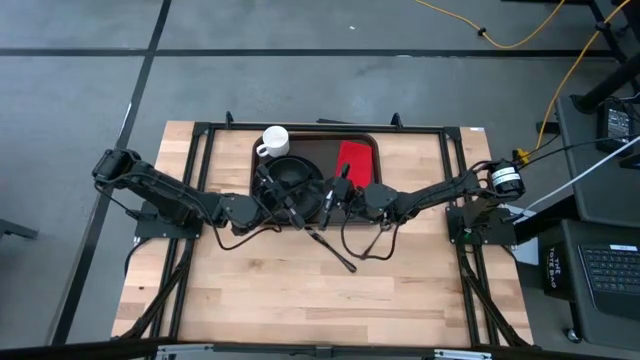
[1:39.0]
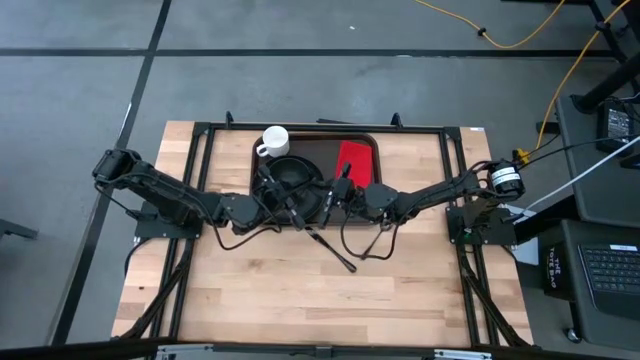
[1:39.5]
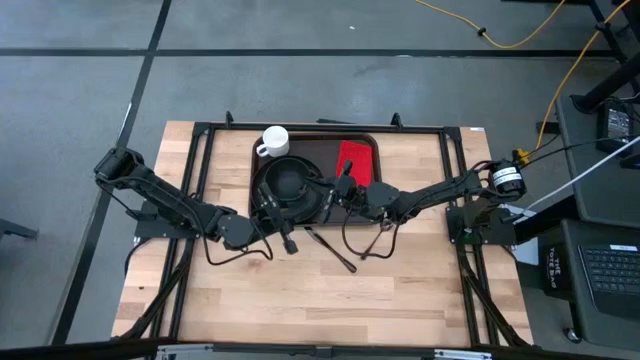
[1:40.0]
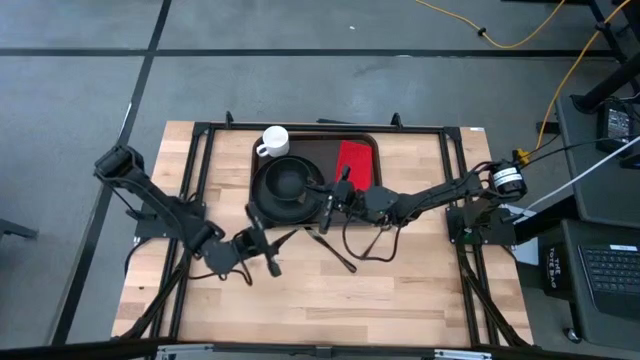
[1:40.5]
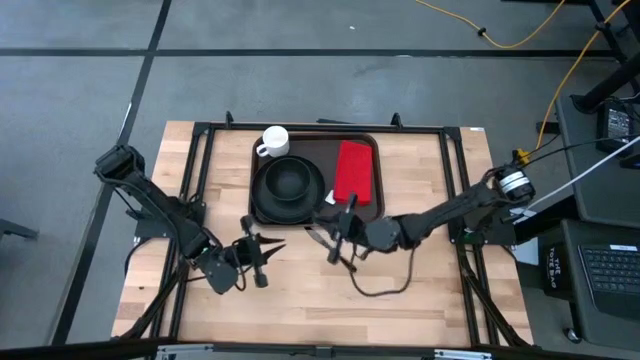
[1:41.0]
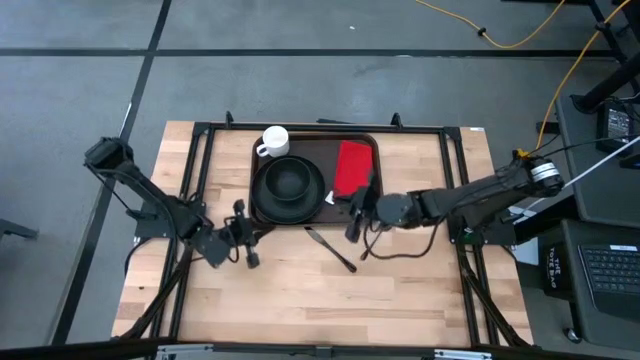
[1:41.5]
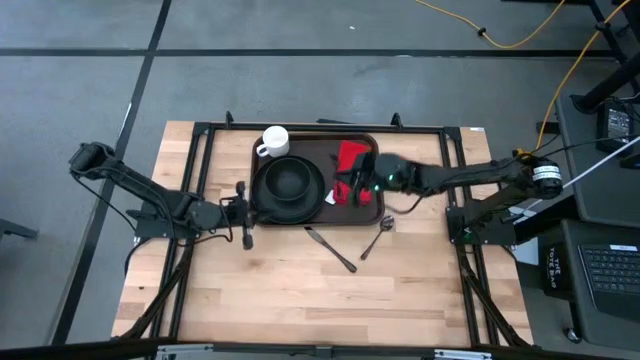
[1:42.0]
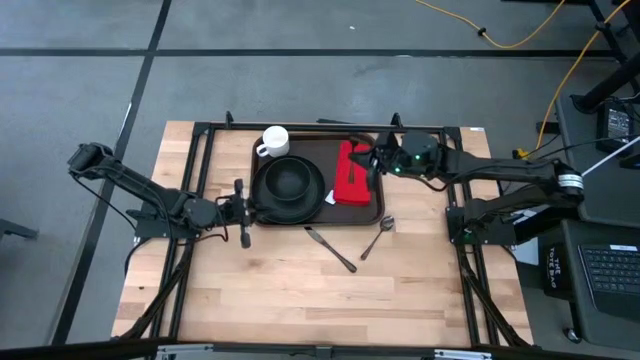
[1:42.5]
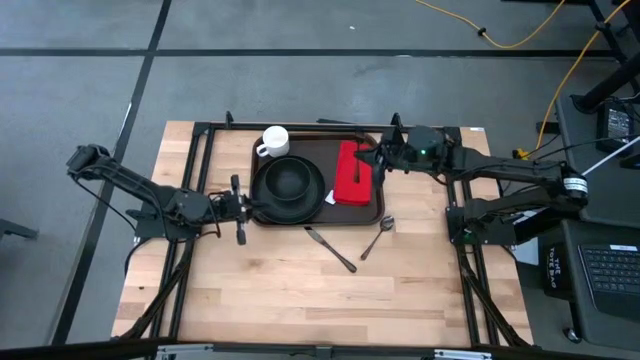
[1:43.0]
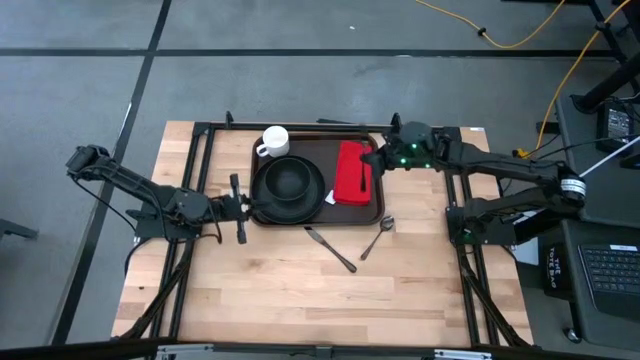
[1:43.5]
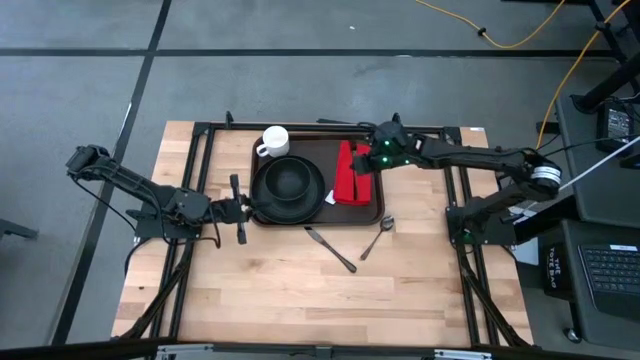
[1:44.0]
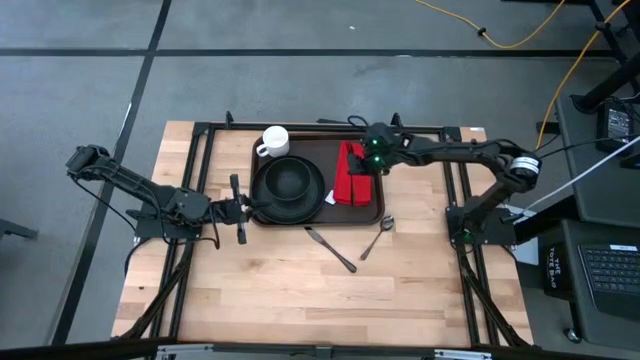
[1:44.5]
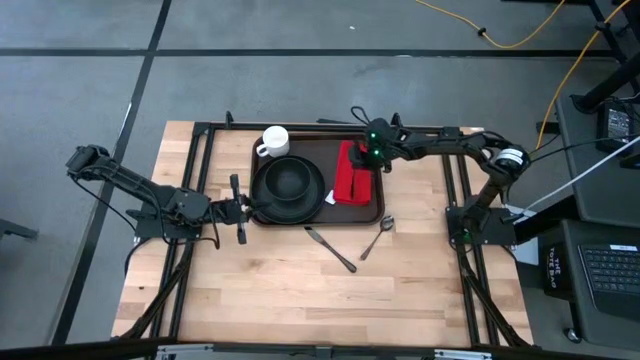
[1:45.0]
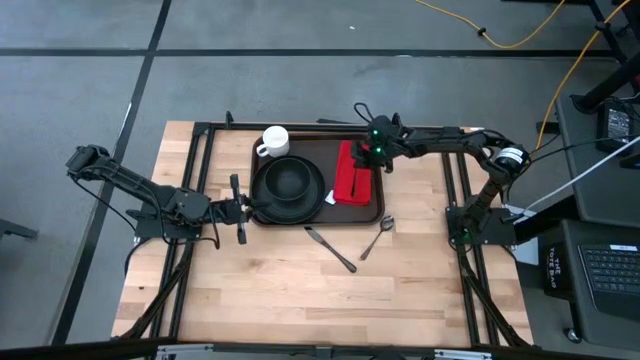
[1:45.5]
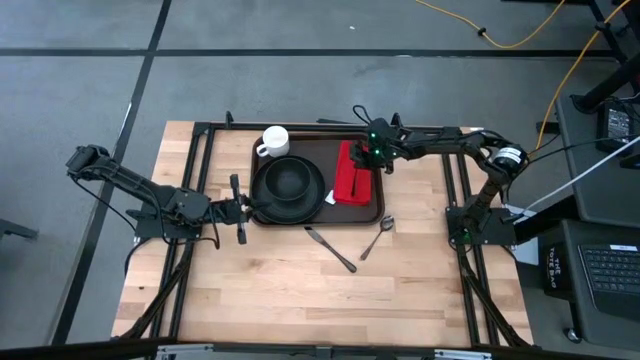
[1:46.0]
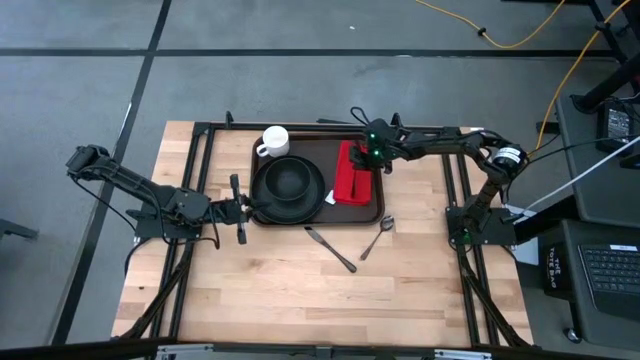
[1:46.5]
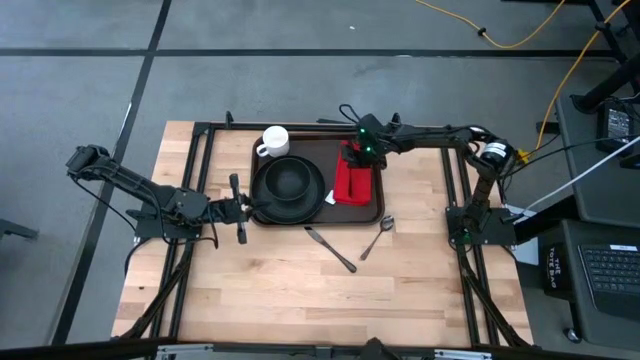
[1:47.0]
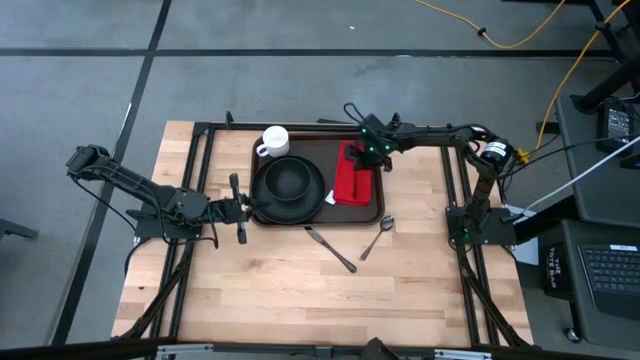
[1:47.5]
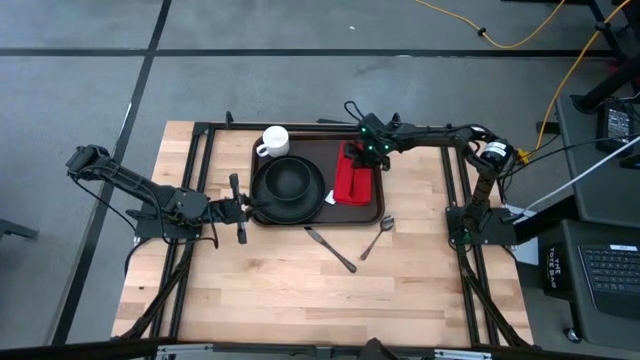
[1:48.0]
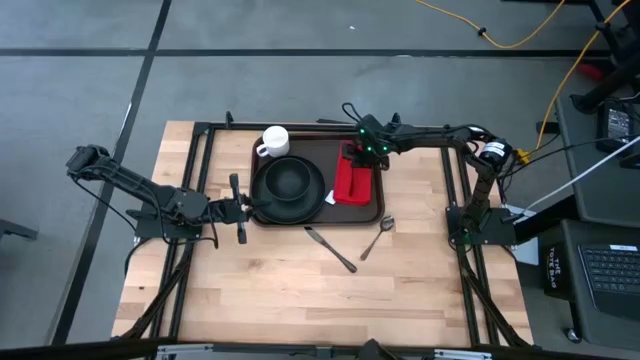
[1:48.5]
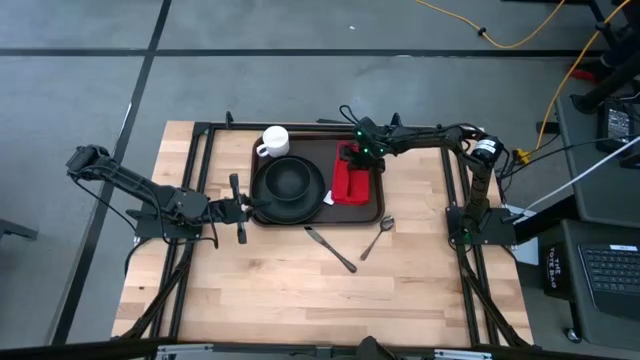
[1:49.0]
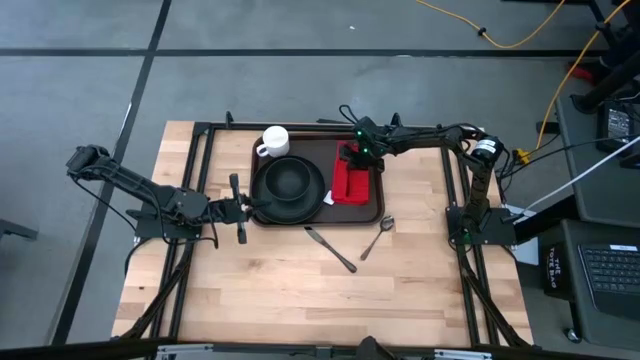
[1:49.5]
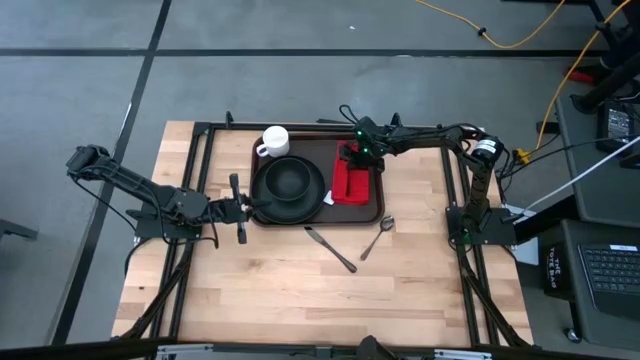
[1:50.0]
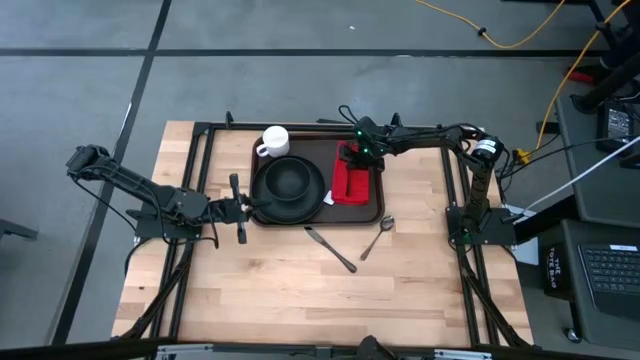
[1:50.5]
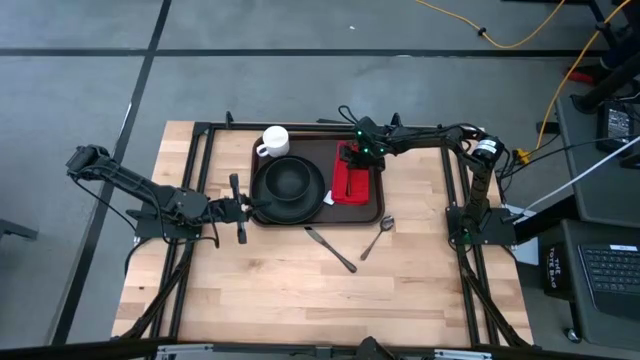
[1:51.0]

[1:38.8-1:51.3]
Task: Set up tray
Put the black fork on top of the red table napkin on the brown serving tray

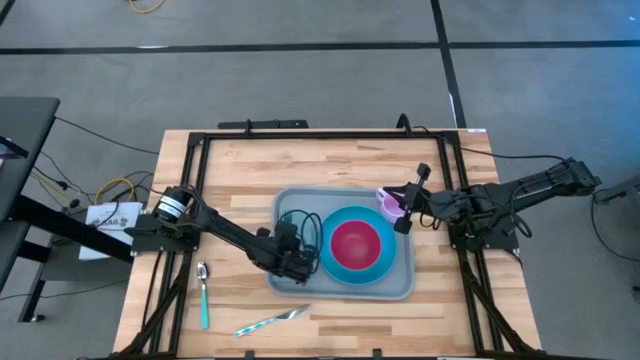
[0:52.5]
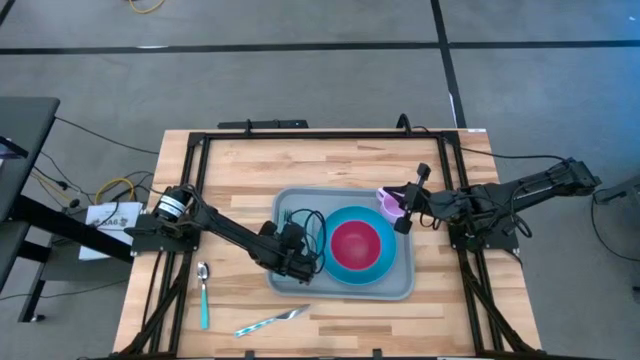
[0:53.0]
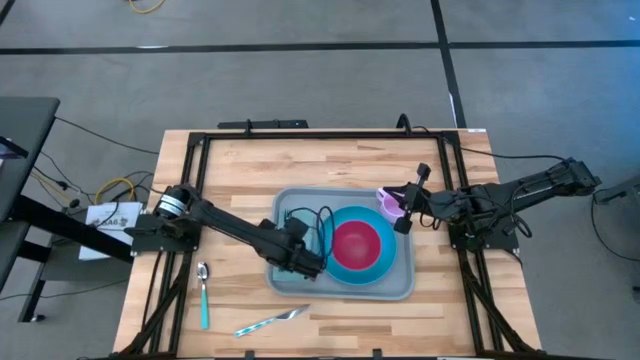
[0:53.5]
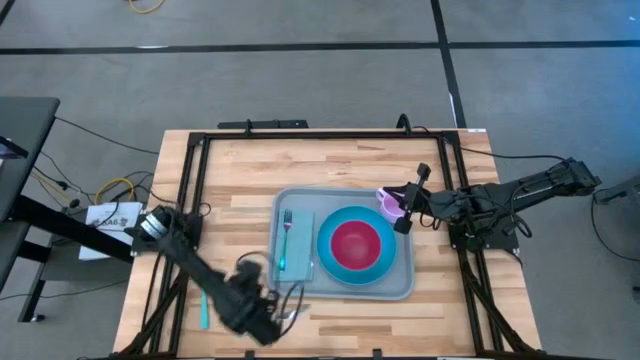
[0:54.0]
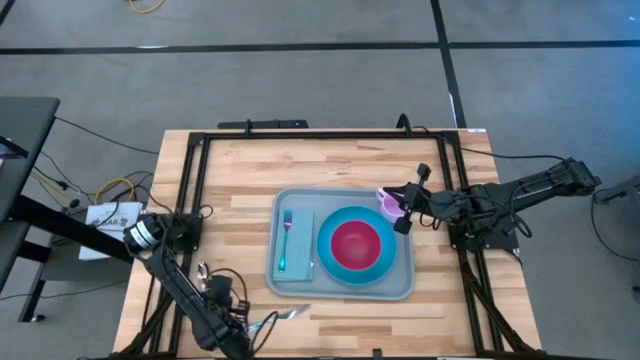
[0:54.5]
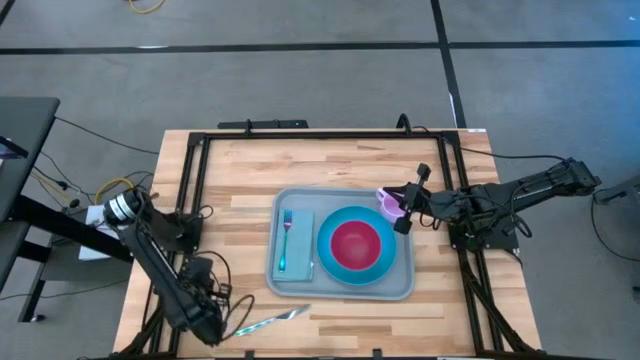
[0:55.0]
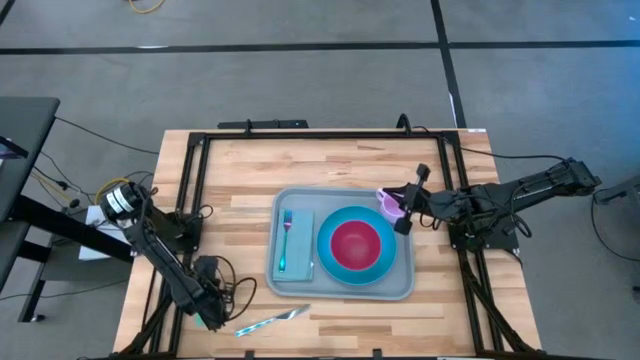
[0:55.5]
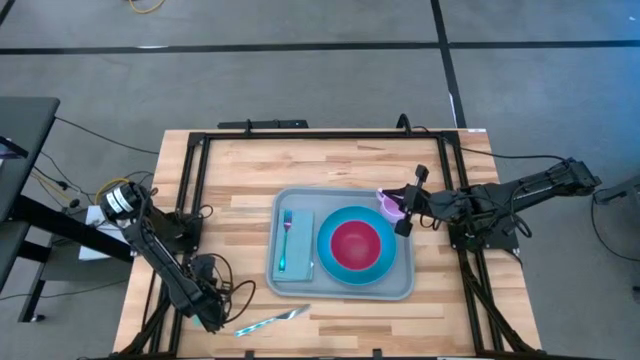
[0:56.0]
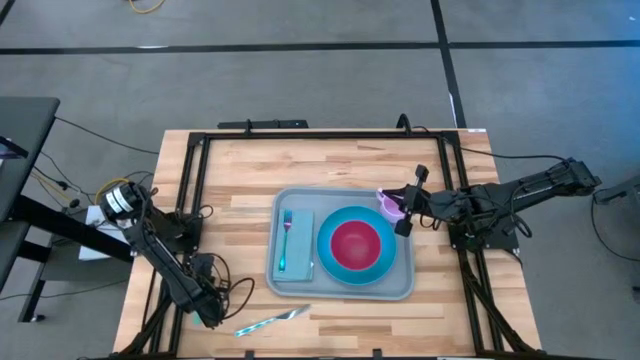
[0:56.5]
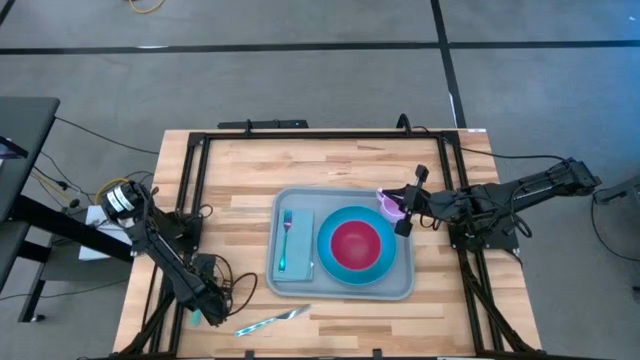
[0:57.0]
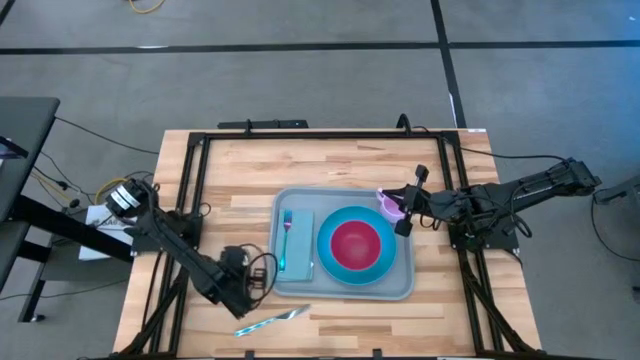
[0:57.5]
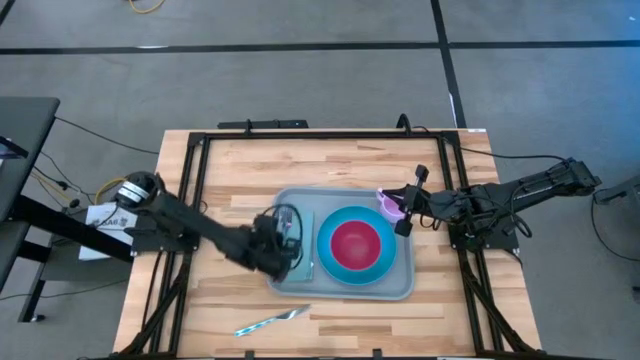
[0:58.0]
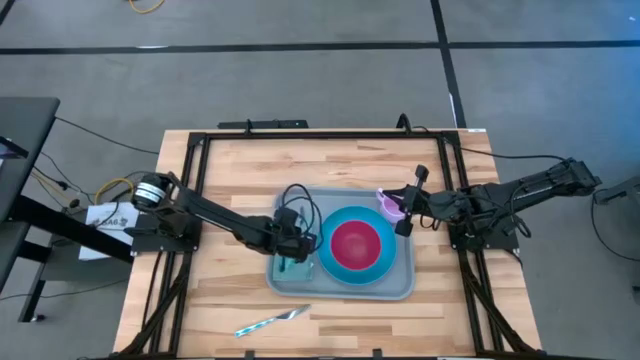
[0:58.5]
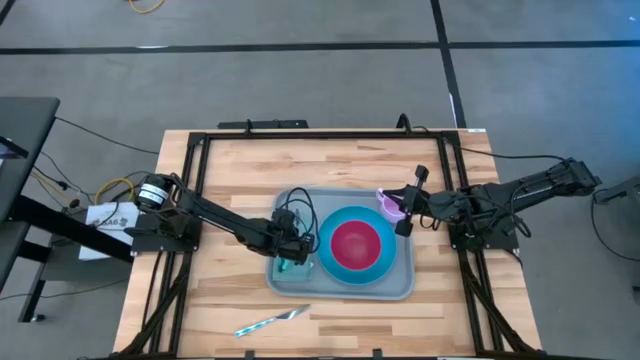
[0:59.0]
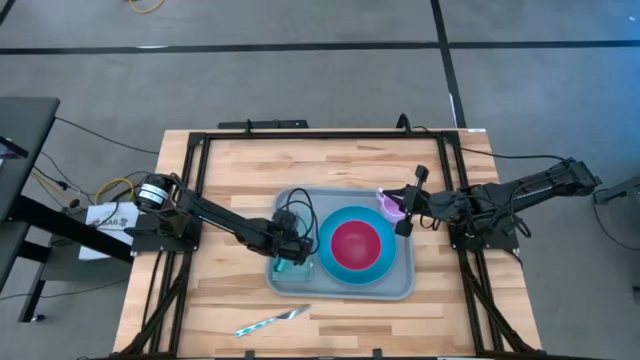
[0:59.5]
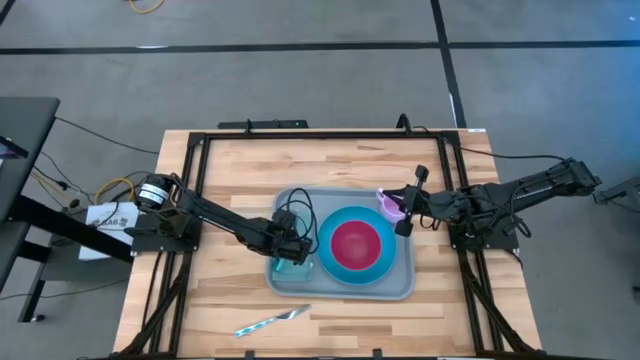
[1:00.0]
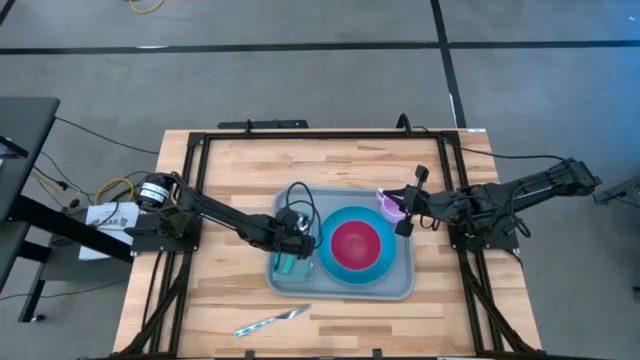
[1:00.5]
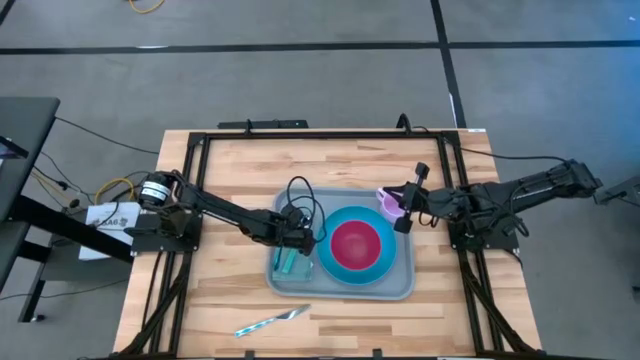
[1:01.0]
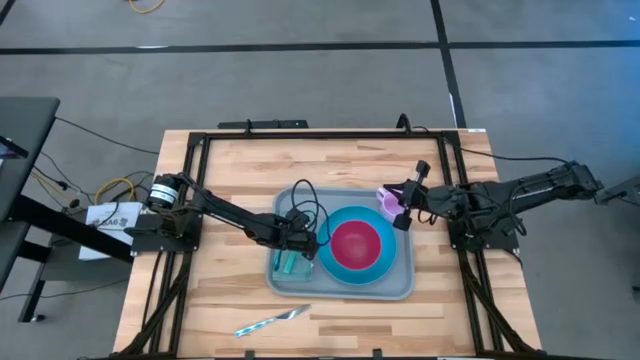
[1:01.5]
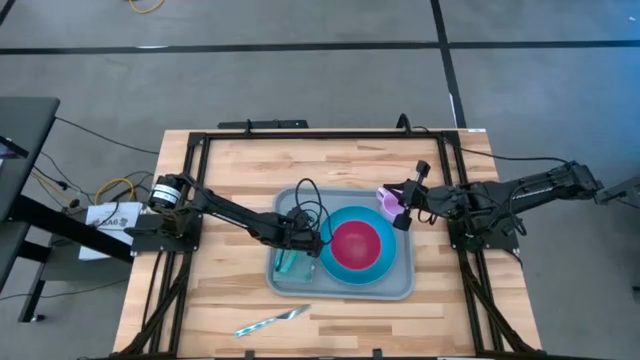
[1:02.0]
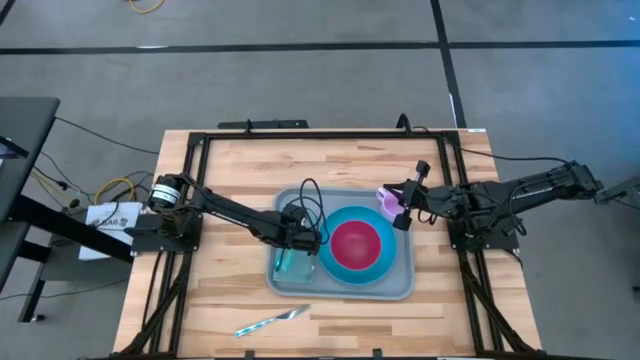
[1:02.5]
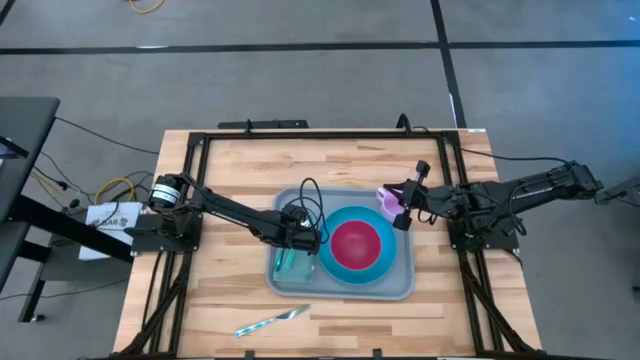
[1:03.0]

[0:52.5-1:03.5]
Task: Set up tray
Put the blue spoon on top of the blue napkin
